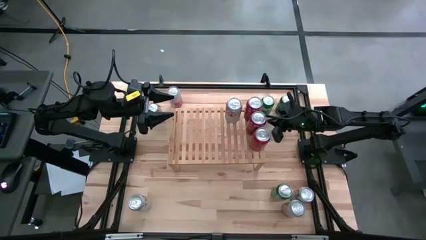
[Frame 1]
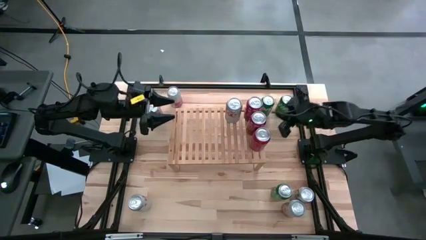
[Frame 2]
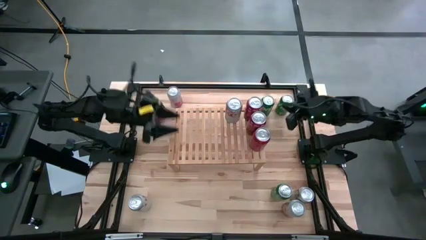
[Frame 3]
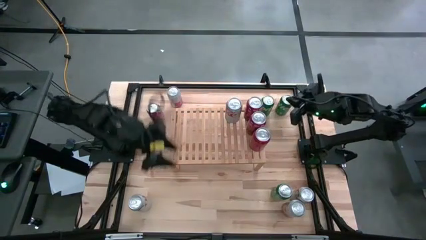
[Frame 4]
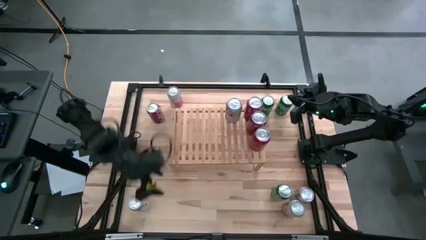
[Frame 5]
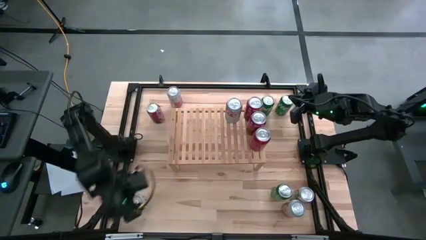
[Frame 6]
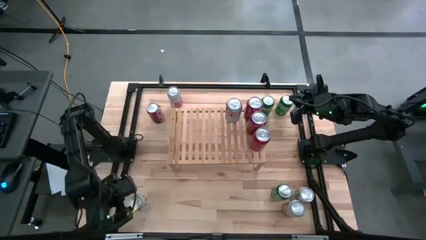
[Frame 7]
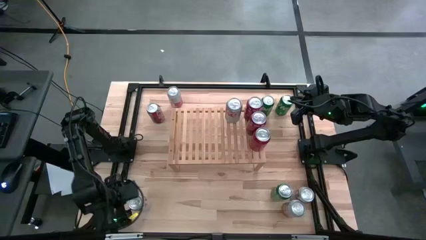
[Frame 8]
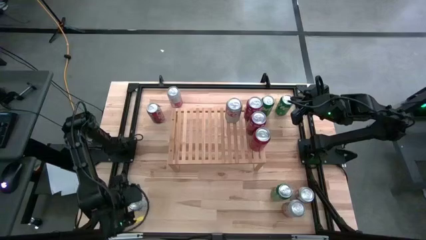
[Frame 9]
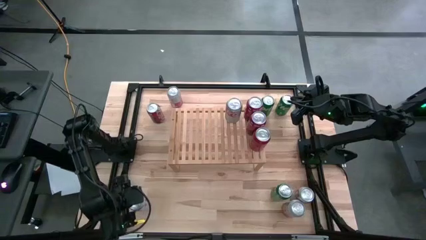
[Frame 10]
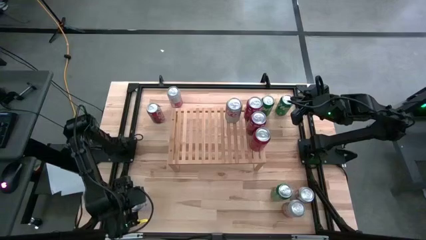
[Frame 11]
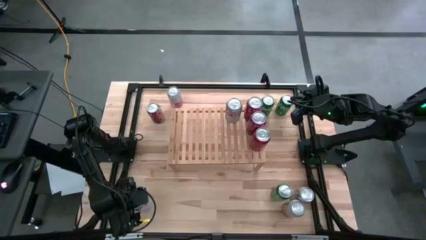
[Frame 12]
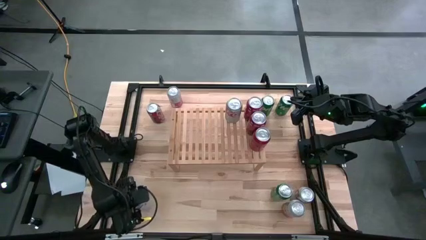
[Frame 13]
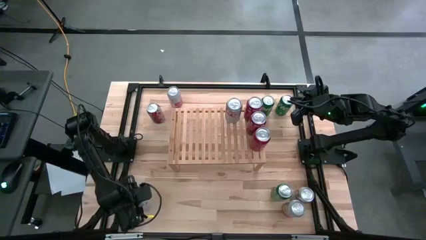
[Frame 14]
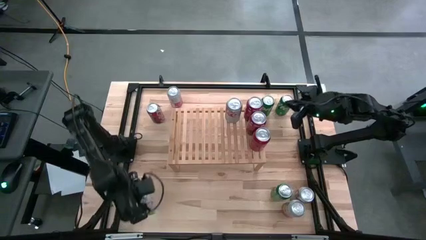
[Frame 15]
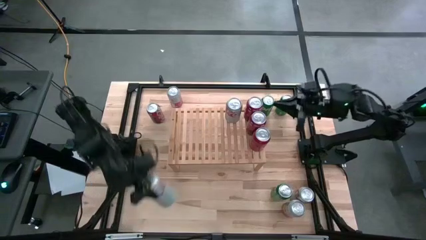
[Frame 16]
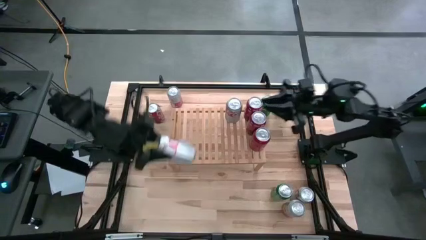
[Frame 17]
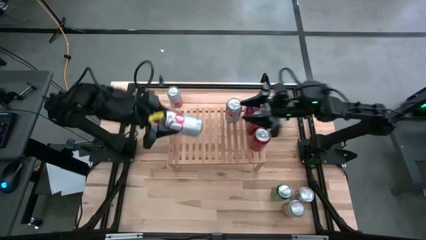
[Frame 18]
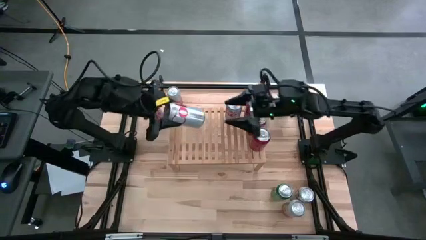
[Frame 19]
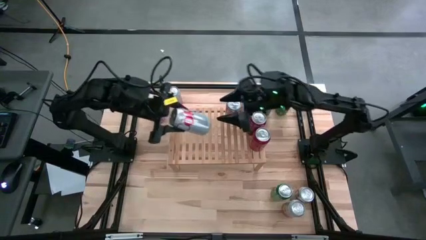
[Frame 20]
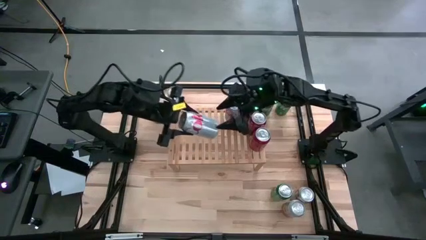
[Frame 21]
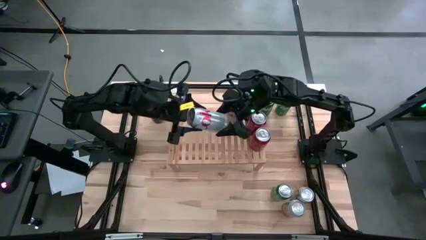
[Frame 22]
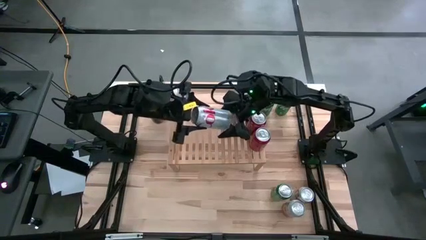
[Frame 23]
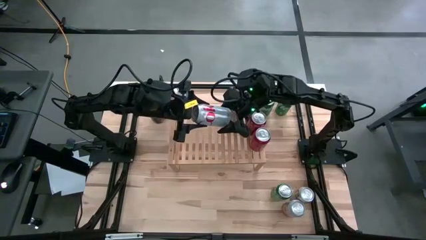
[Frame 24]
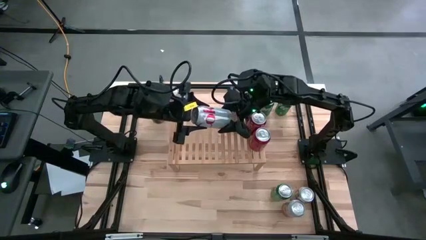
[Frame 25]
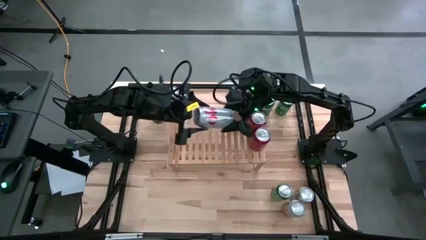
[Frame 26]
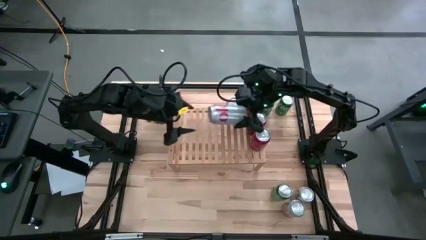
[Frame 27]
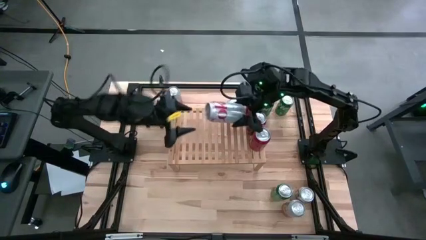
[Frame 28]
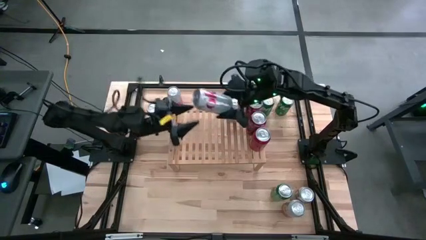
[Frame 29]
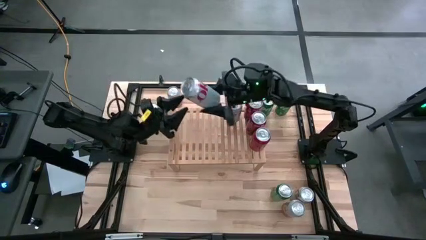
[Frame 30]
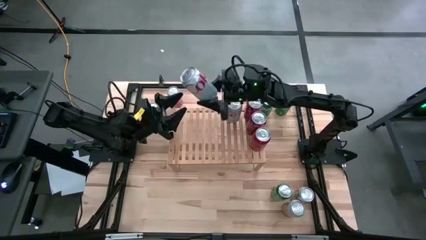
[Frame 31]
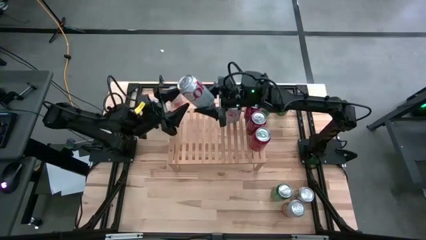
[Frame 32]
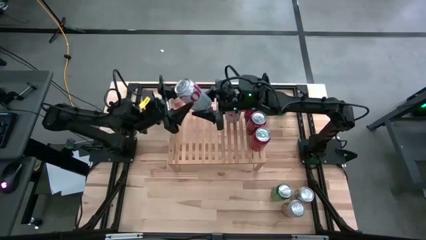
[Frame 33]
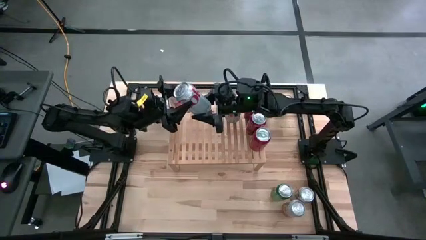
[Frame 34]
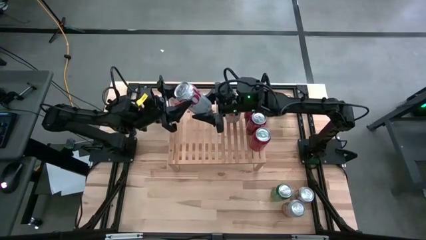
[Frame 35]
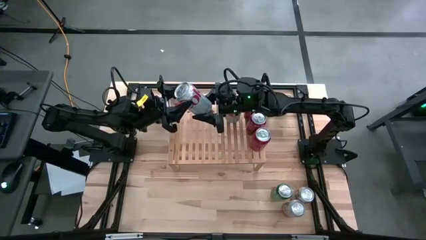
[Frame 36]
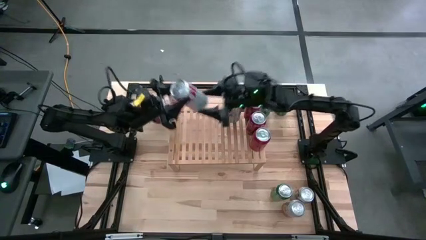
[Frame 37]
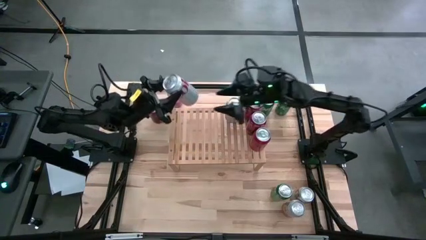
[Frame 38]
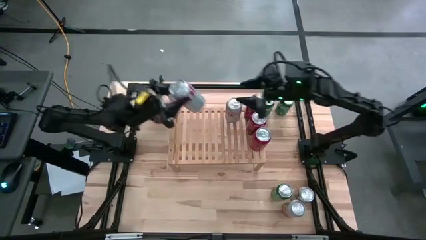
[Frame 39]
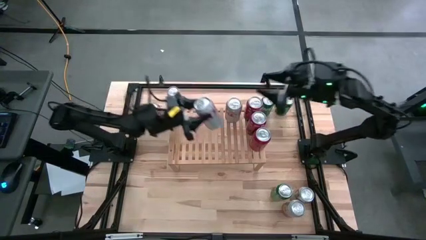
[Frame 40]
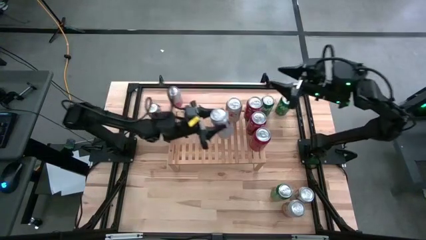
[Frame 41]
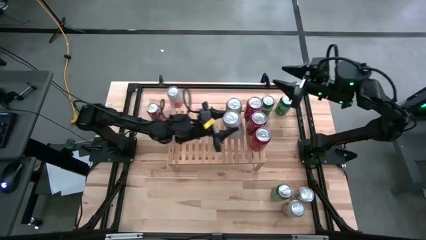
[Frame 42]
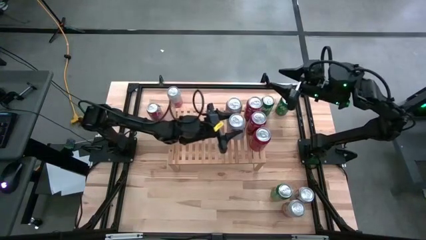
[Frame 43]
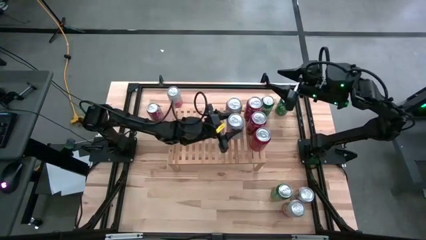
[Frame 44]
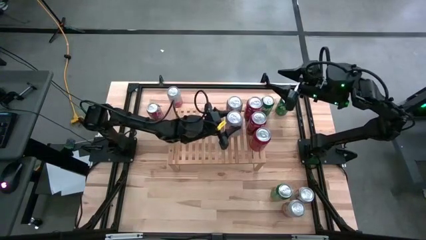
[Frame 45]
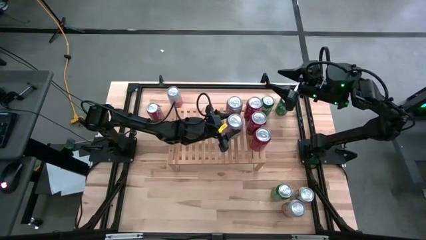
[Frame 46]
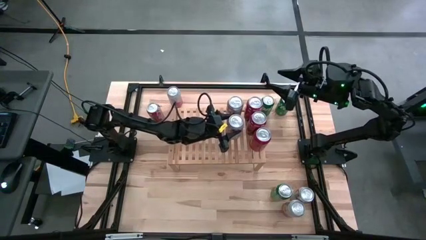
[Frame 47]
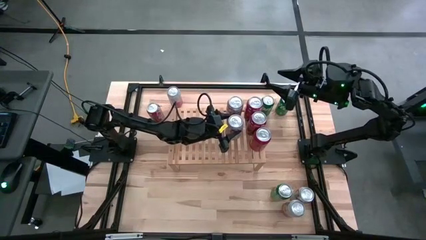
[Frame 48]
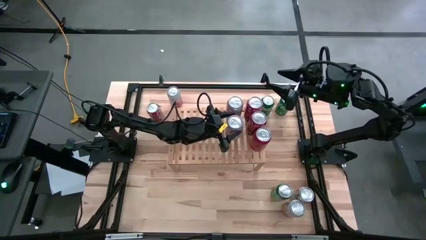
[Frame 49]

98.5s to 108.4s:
Task: Place canned beverage on shelf
Put the bottom left silver soda can on the shelf

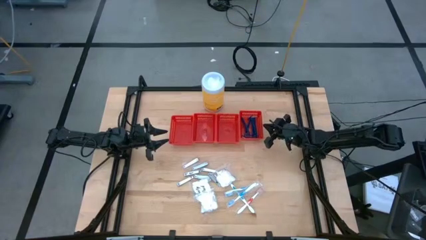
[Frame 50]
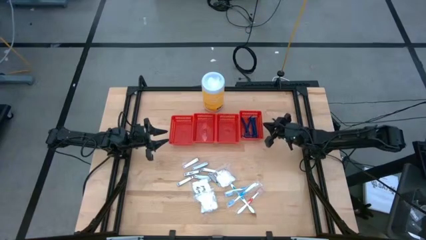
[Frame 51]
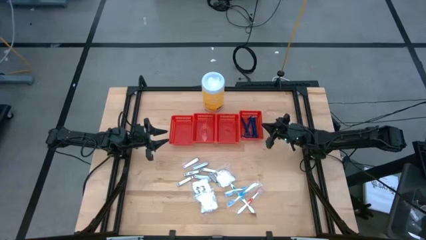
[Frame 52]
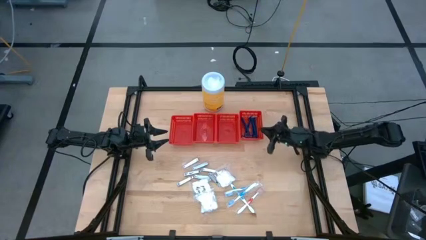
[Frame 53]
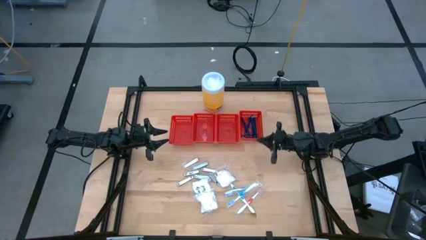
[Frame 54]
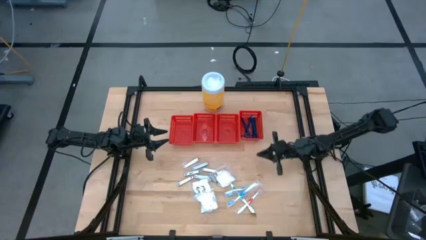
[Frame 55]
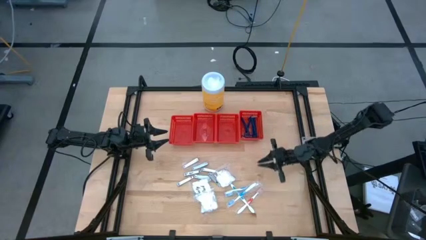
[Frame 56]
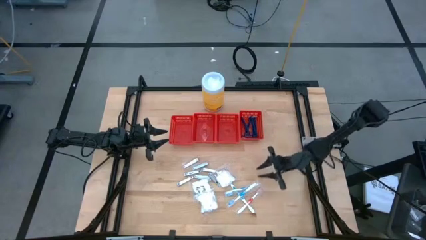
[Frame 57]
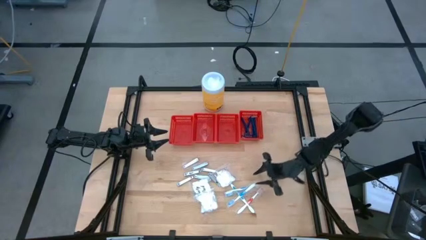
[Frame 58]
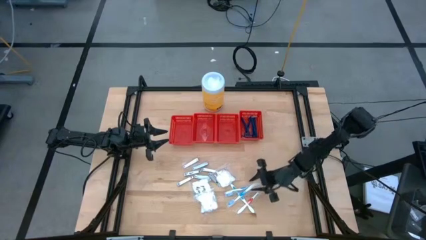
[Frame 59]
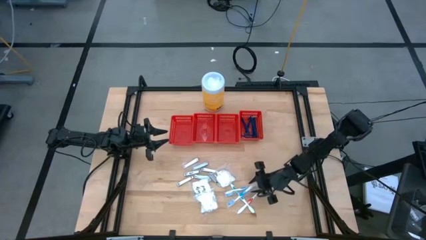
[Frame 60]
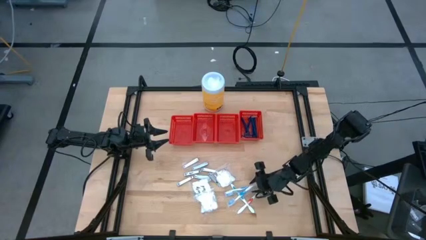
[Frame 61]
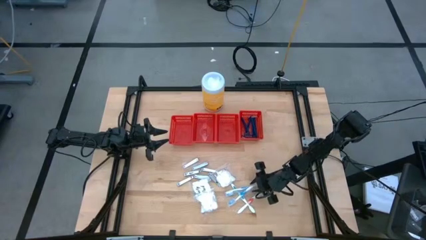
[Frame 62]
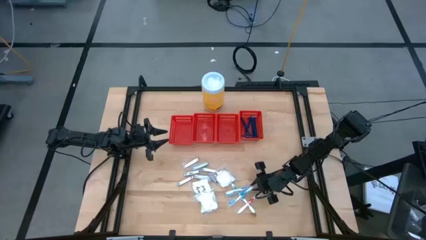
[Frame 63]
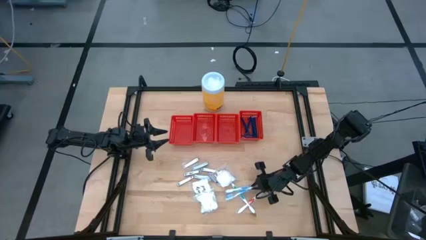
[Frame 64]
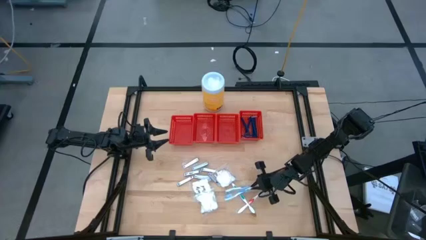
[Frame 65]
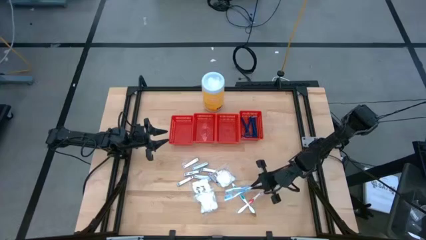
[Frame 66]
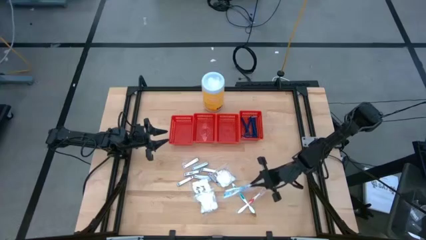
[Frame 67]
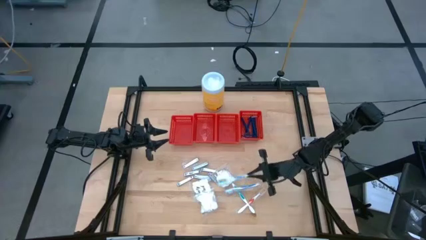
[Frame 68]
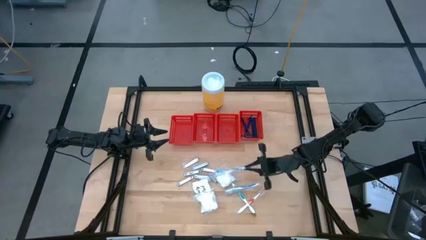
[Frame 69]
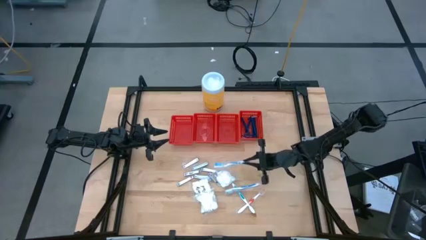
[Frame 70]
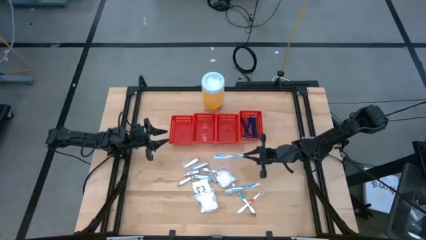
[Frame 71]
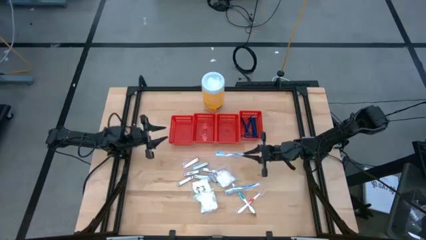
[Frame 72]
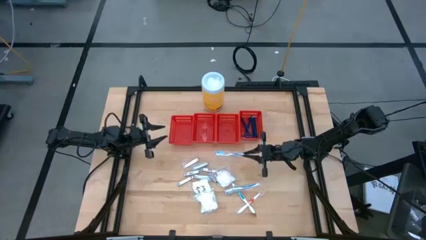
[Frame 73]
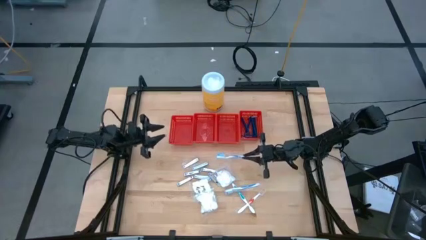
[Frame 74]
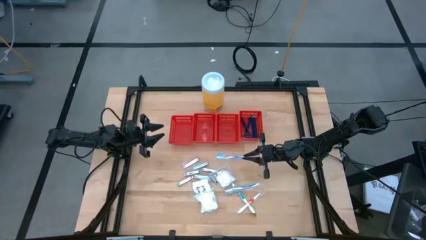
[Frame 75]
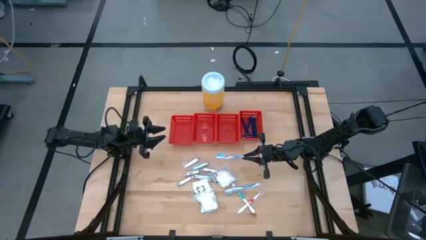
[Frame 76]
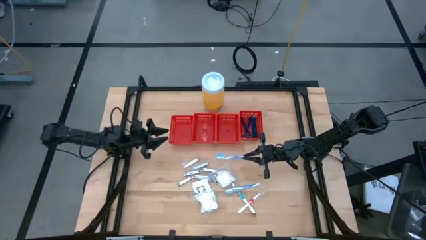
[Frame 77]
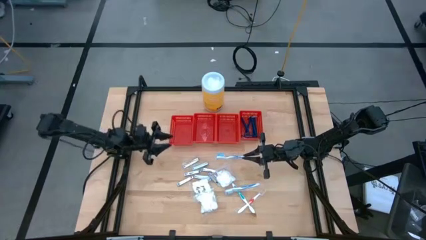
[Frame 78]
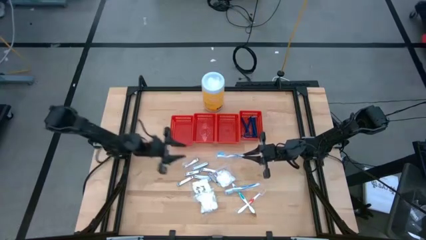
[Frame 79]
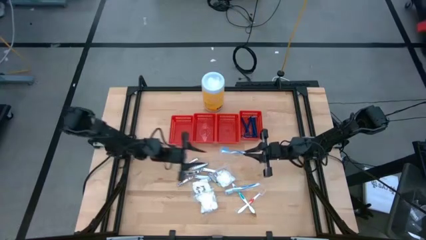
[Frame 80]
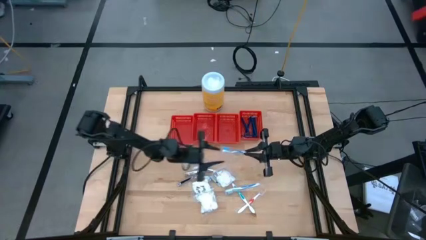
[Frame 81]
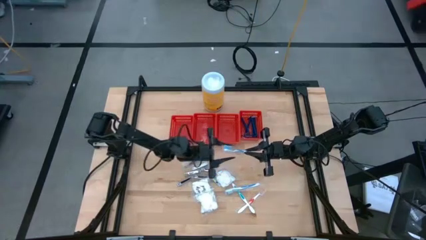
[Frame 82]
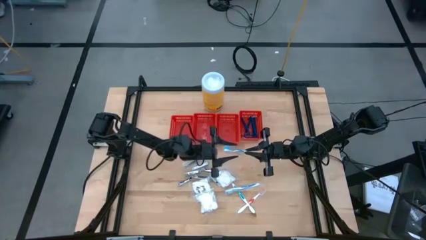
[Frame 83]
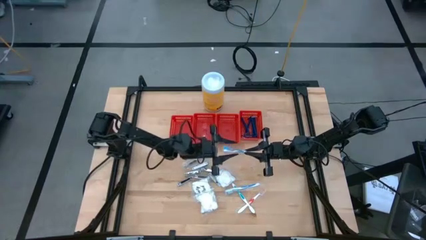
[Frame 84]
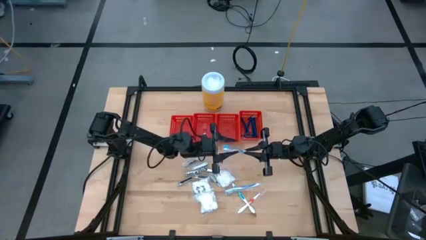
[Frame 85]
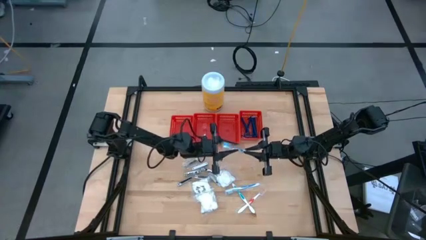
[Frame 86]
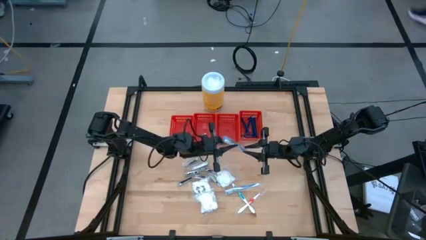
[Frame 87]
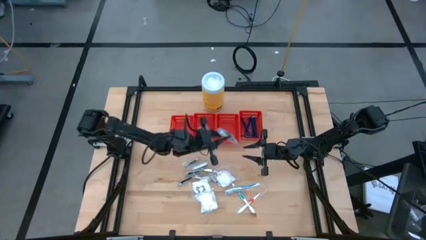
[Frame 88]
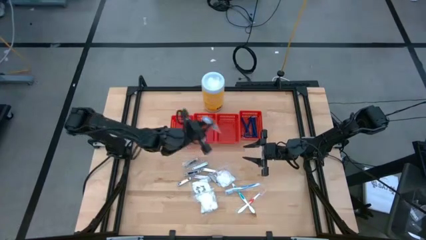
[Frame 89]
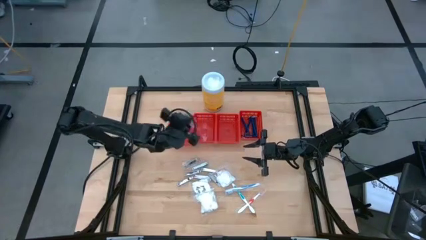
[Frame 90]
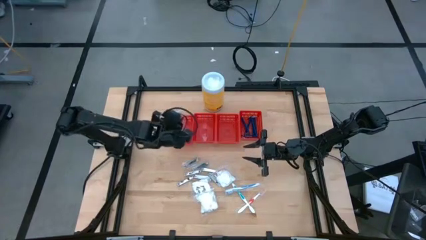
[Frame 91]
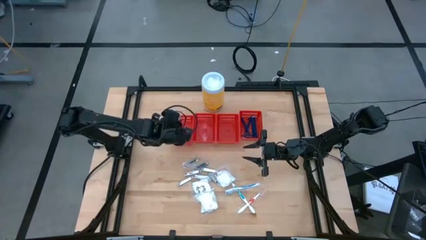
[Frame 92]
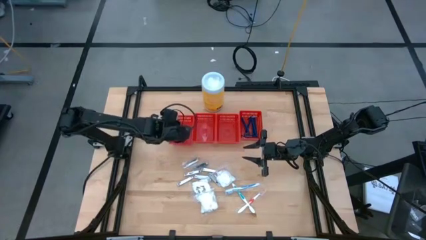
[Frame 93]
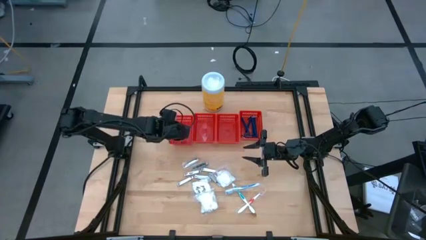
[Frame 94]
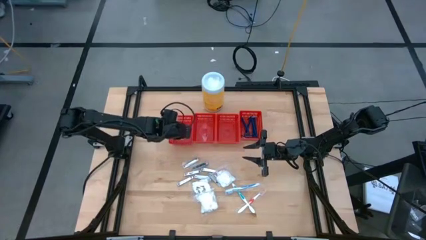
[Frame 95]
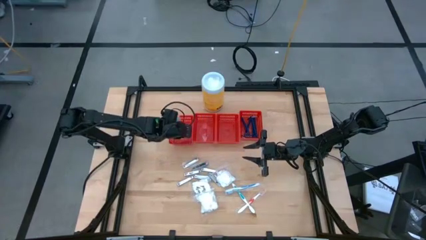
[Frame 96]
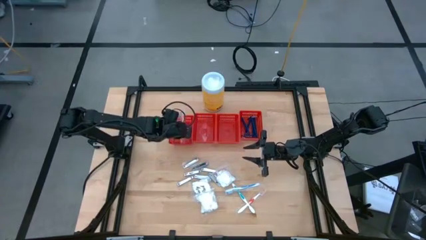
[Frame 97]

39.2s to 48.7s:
Task: Pick & Place Travel size toiletries
Put the blue toothbrush in the left red basket
